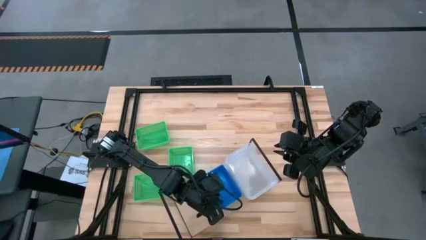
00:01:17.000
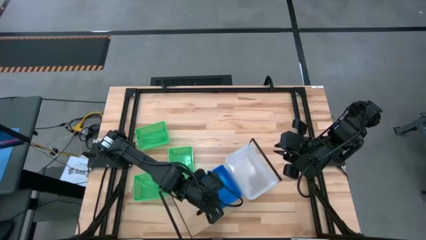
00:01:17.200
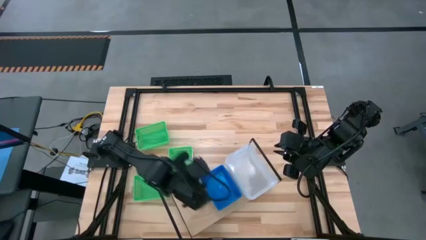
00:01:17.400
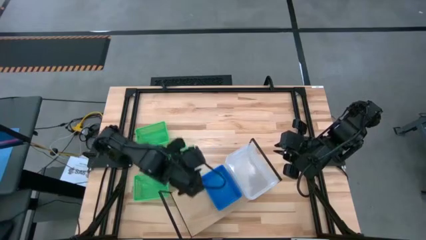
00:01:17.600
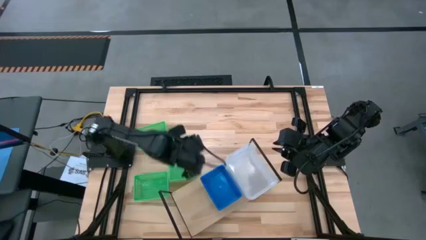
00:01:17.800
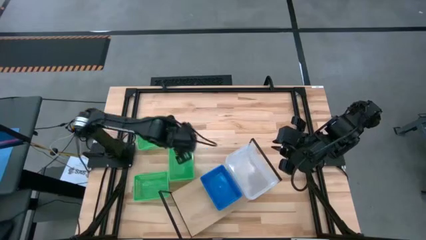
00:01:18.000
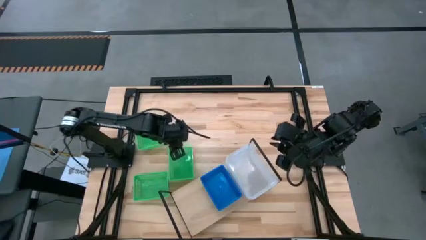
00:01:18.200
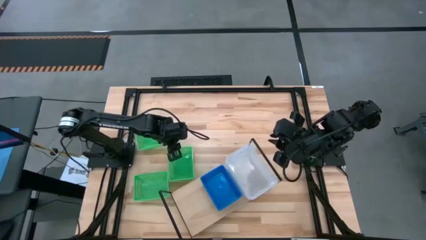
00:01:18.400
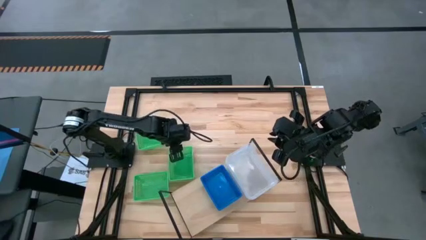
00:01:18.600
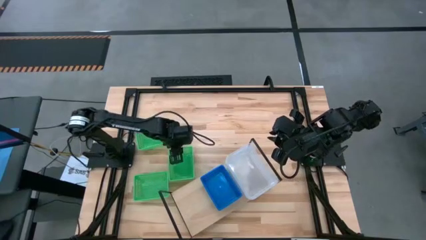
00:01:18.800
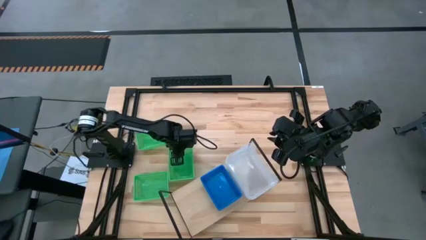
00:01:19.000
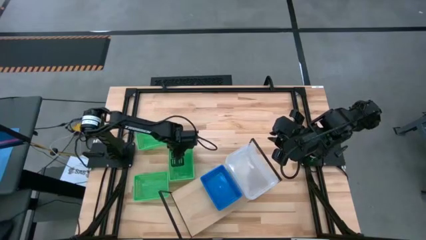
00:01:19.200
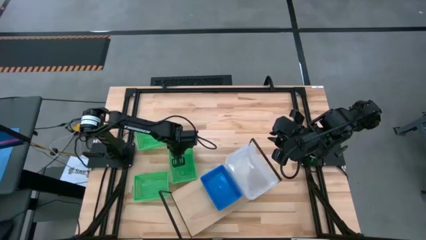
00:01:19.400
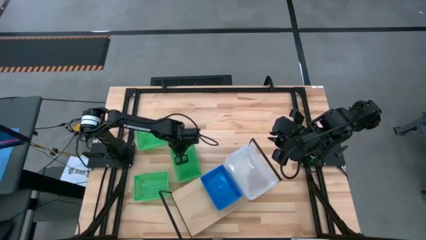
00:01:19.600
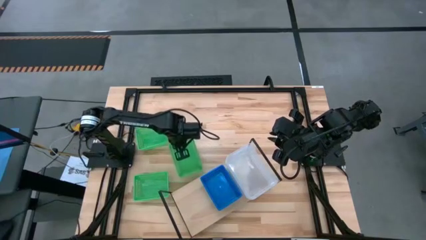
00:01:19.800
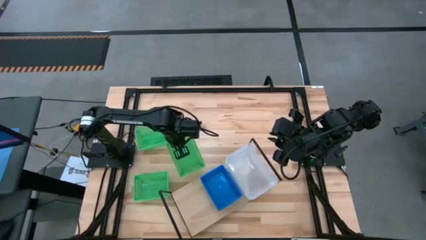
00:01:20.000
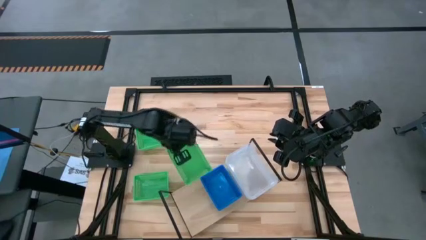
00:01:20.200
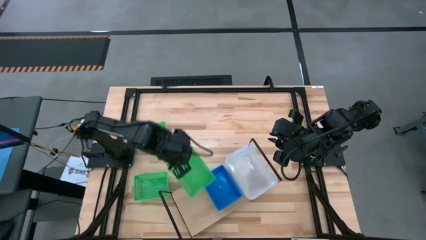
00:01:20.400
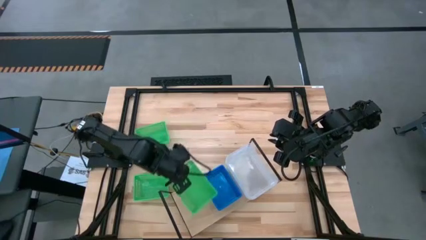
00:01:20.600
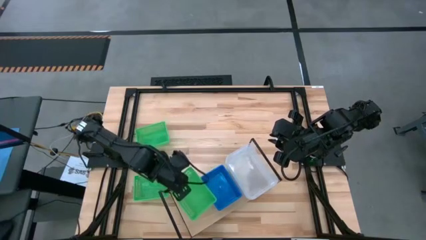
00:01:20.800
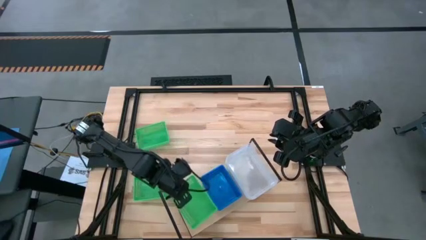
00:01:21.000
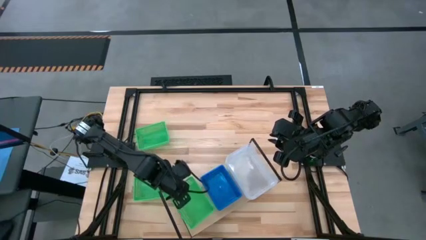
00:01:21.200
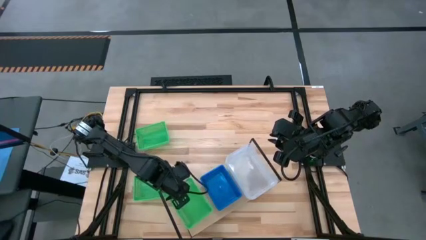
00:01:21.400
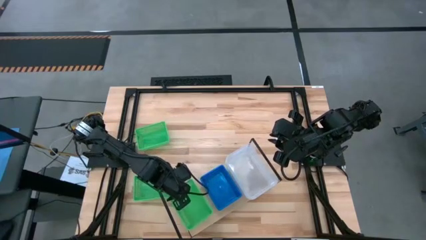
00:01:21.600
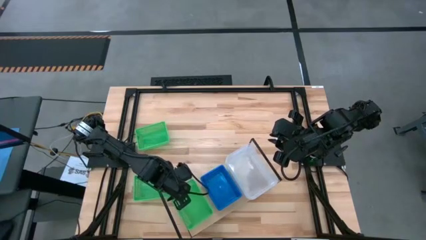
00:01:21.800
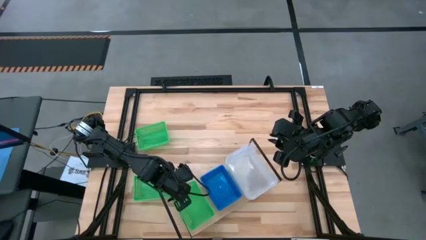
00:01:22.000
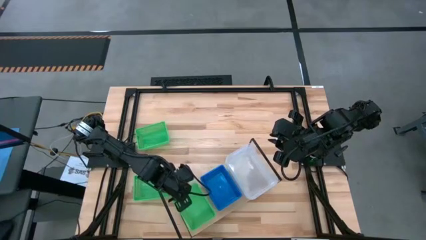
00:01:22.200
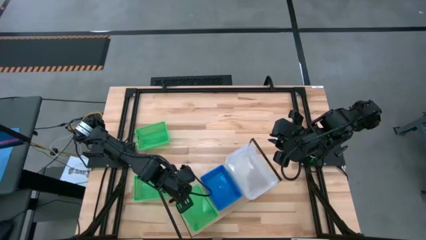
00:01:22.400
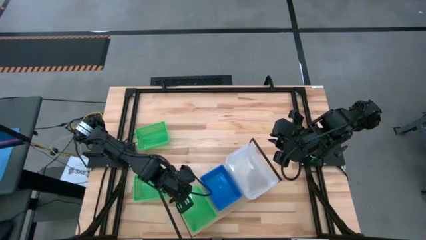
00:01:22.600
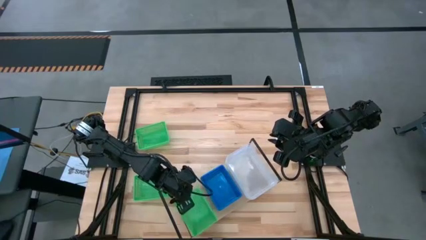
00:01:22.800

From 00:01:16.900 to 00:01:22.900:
Task: Stack baskets on shelf by color
Put the middle green basket on the shelf

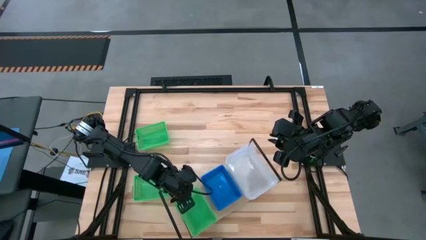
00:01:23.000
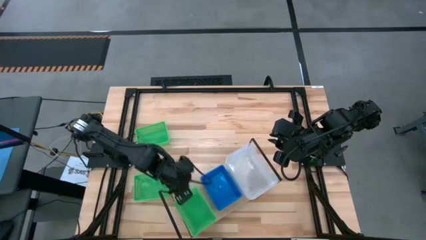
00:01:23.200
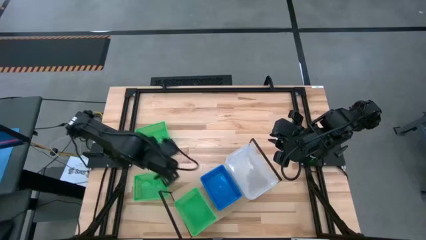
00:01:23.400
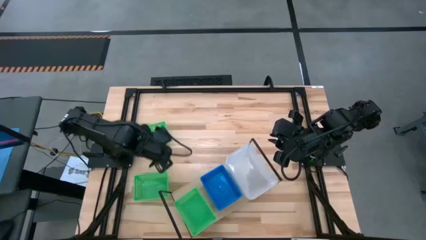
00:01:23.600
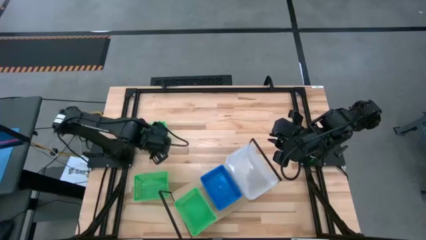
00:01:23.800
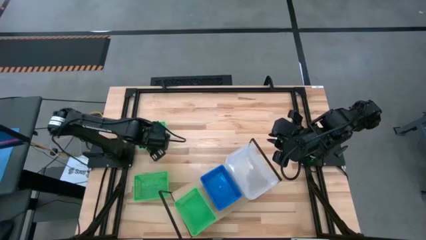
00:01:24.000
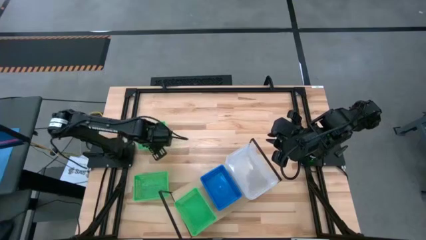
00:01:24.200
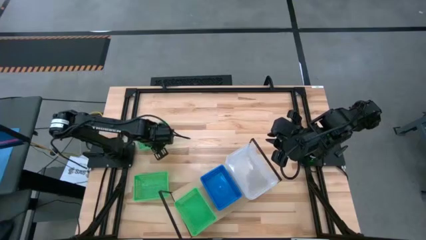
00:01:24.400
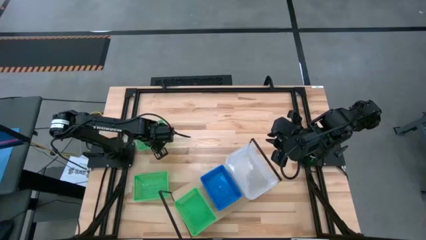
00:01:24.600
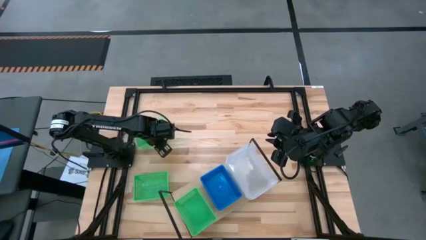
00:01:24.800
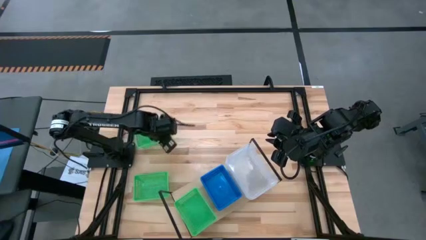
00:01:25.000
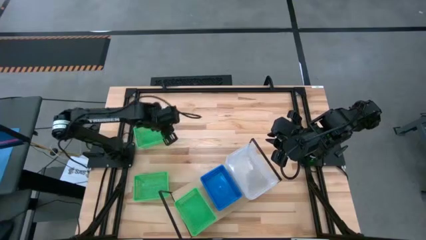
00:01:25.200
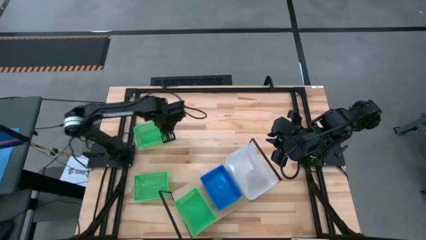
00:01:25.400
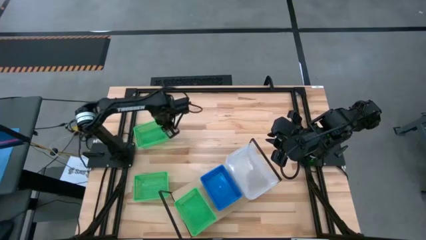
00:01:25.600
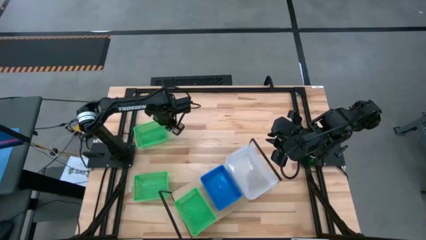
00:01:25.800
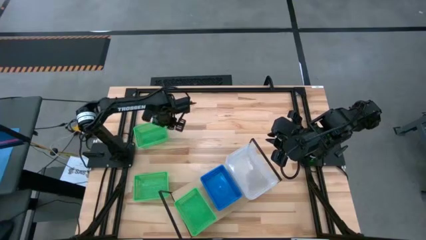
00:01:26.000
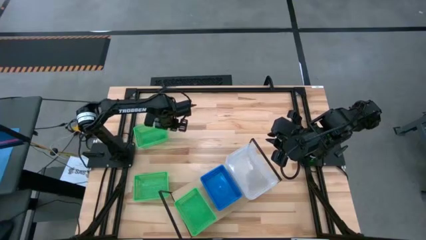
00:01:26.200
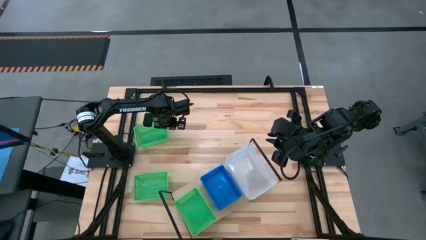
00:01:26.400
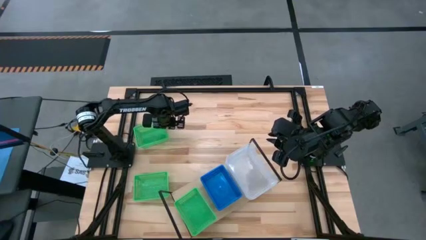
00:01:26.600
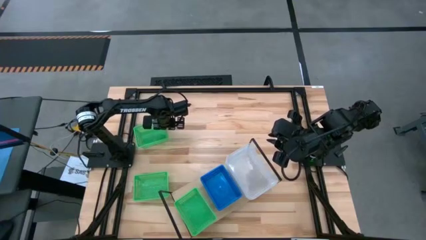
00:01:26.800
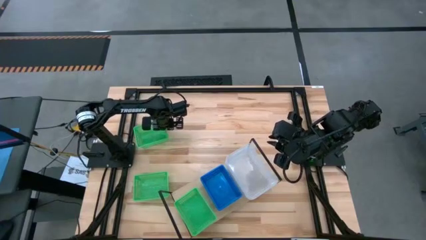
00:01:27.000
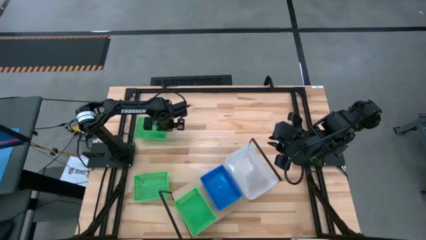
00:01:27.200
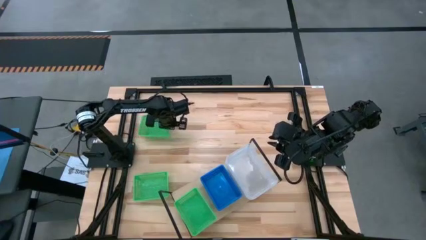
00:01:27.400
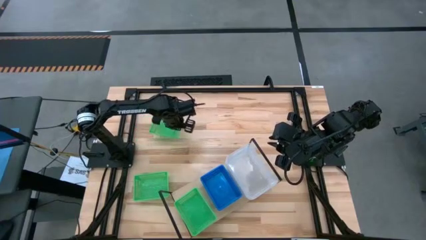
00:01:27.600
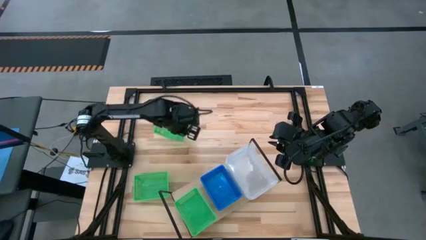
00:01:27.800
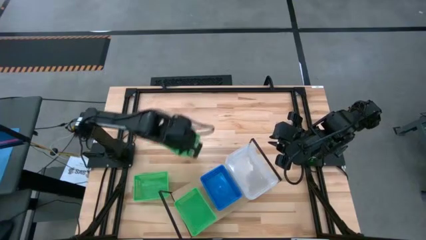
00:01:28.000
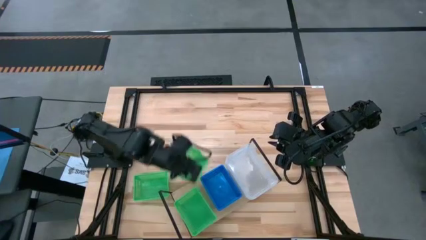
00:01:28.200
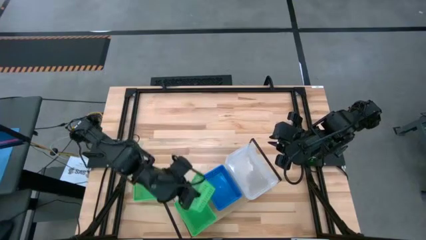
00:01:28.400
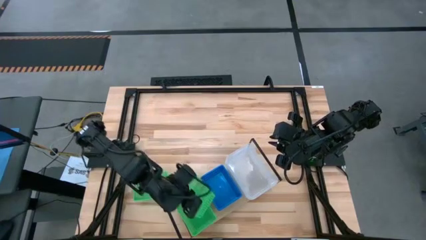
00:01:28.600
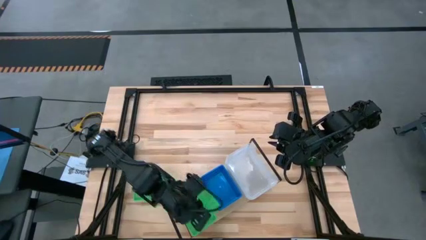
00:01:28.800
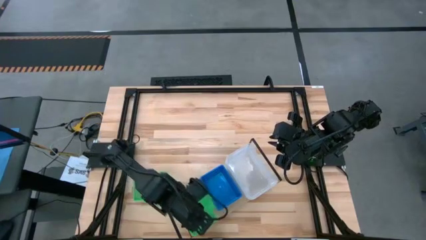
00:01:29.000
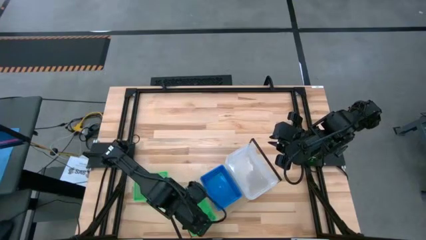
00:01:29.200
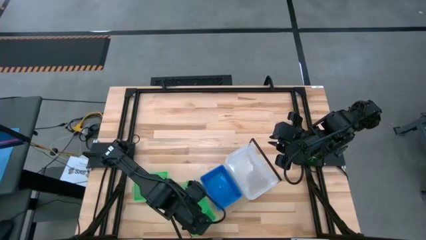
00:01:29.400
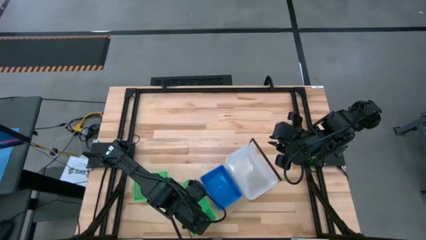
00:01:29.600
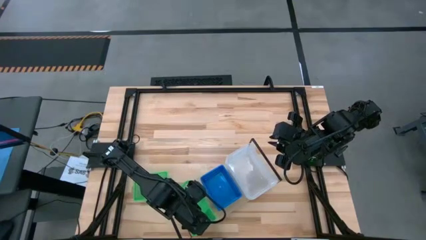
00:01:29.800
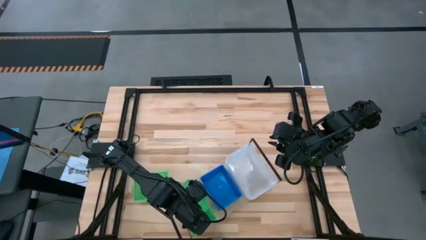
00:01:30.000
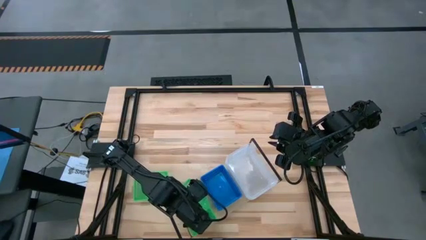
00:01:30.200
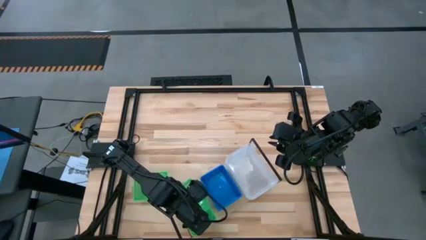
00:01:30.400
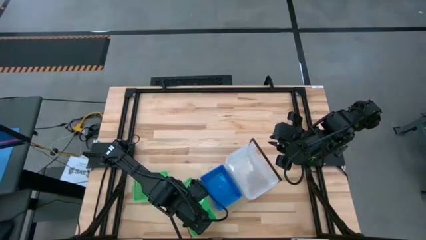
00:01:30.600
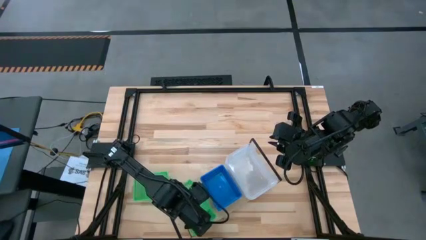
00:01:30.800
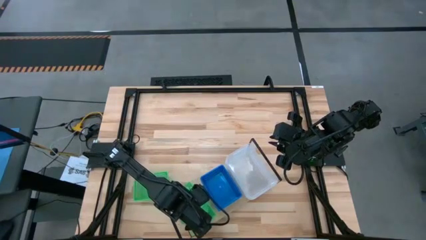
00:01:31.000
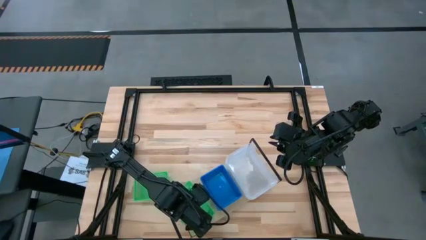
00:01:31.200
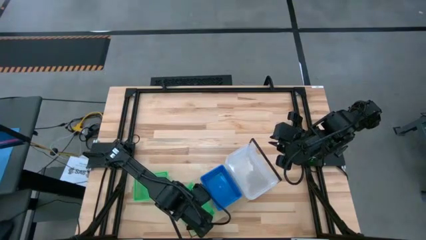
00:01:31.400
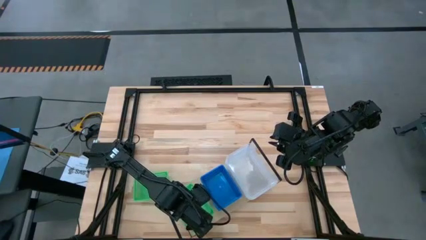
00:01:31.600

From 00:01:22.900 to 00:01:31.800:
Stack the top green basket on top of the other green basket on the shelf

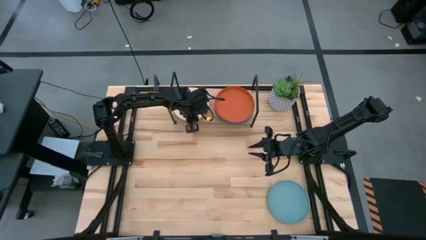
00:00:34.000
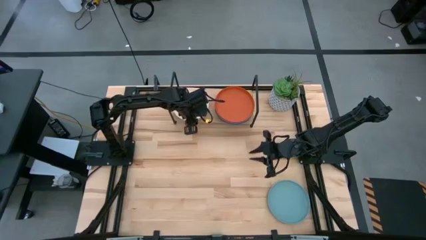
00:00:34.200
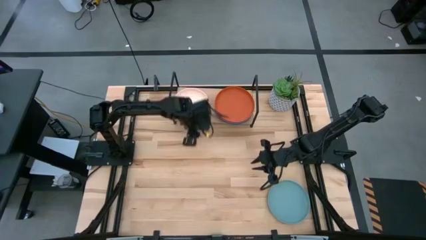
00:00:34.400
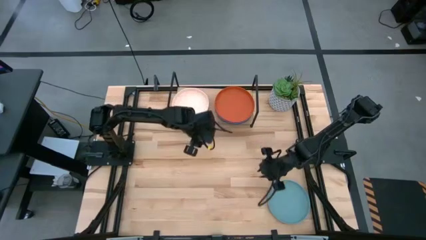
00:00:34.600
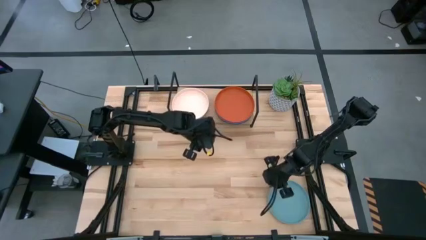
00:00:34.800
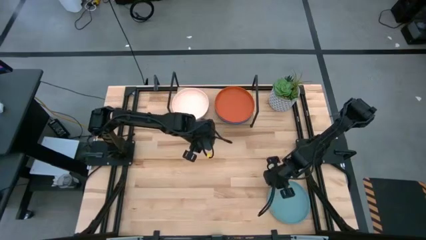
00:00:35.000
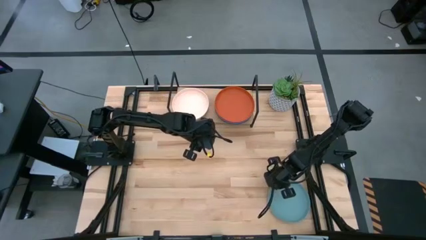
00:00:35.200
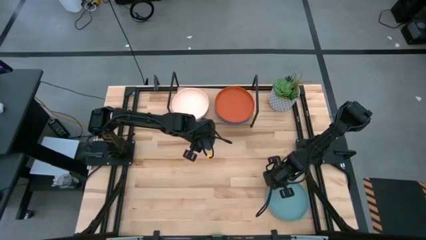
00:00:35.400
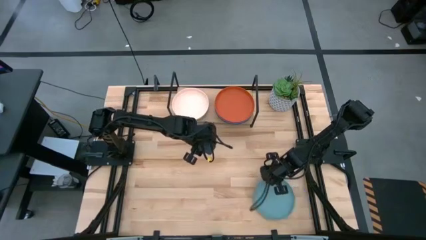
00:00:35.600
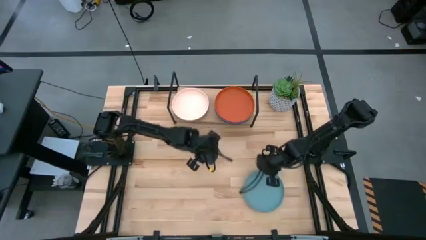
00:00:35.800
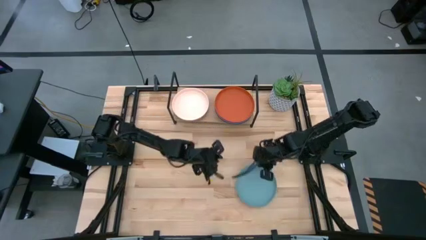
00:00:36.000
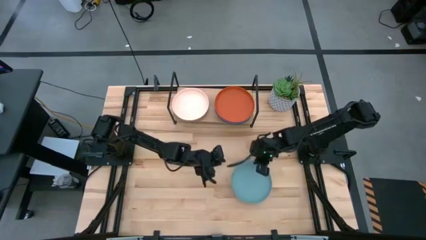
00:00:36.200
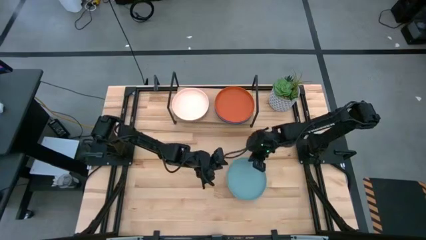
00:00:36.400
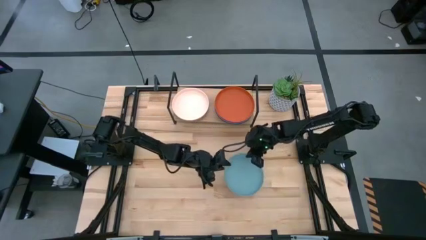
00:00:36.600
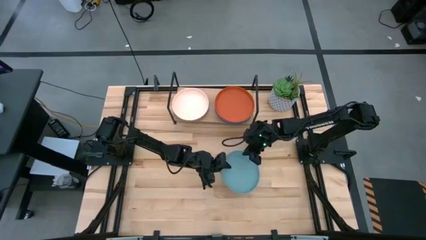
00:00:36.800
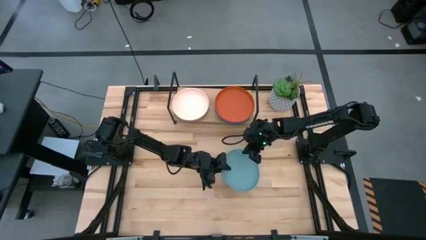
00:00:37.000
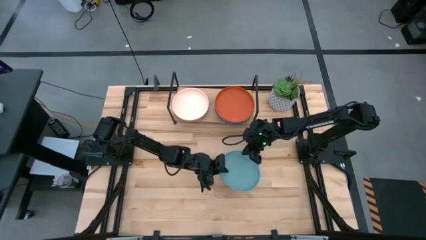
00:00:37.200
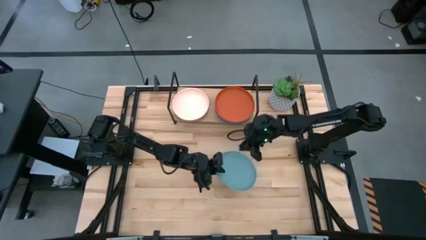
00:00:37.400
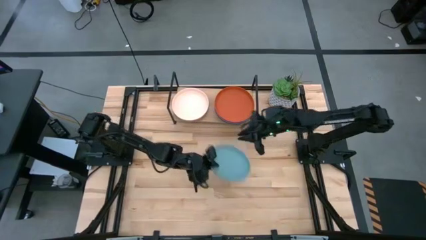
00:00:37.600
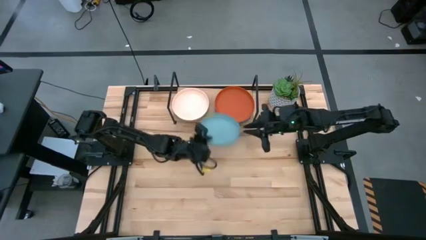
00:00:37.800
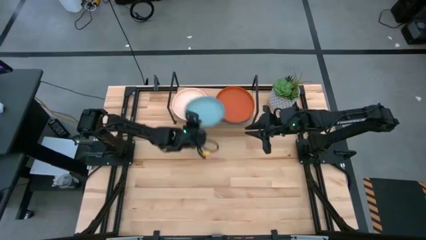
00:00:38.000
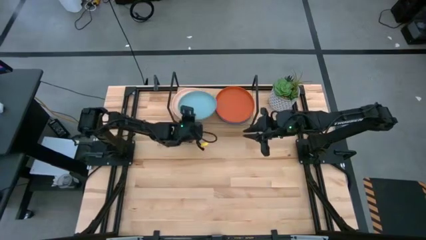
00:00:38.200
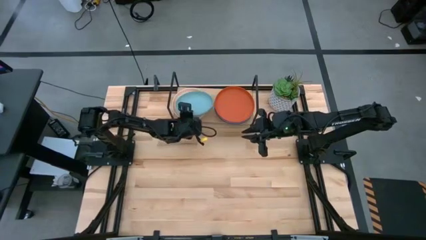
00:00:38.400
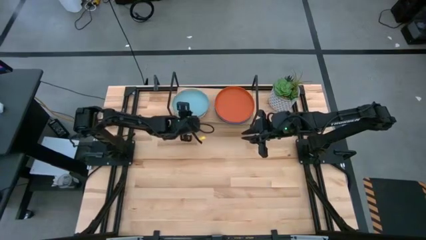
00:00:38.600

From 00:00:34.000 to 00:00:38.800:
Task: Place and stack plates onto a shelf
Stack the light blue plate on top of the light orange plate on the shelf
